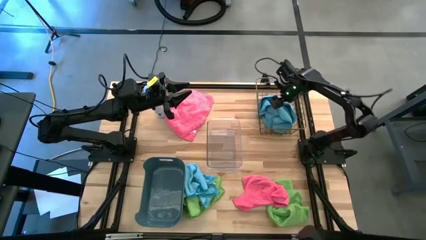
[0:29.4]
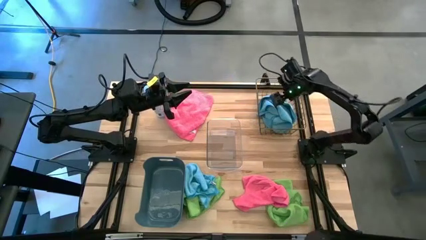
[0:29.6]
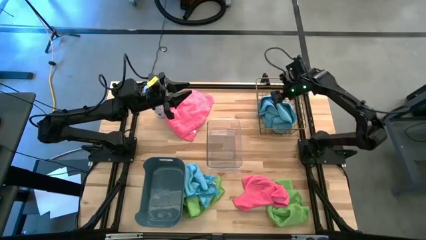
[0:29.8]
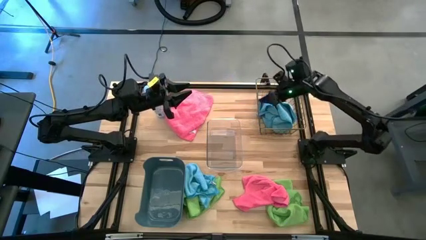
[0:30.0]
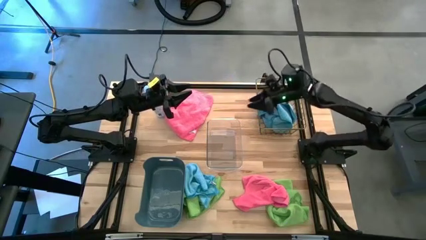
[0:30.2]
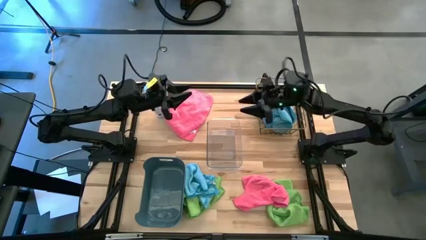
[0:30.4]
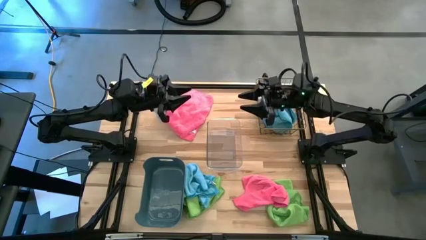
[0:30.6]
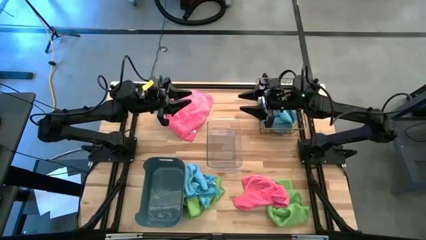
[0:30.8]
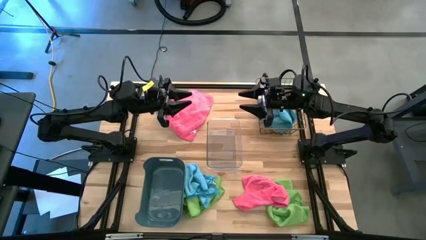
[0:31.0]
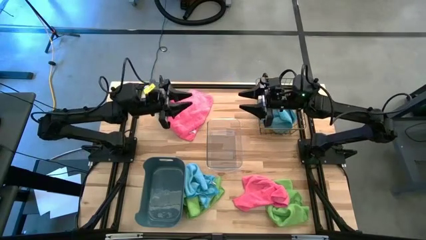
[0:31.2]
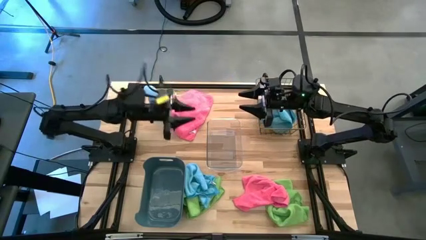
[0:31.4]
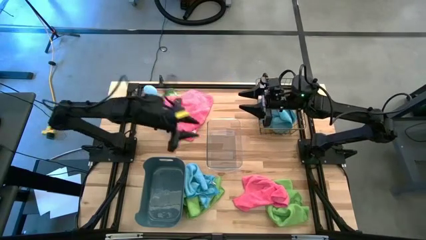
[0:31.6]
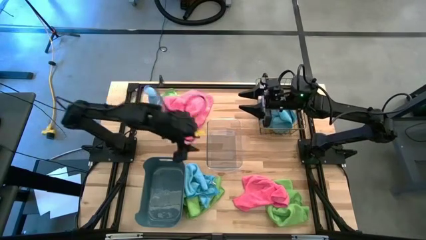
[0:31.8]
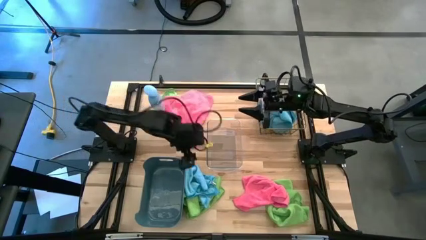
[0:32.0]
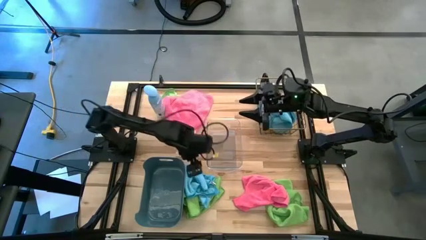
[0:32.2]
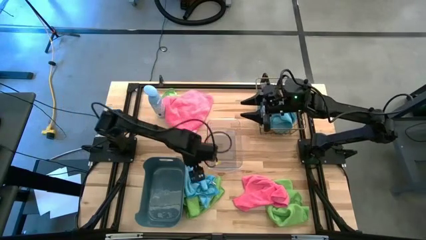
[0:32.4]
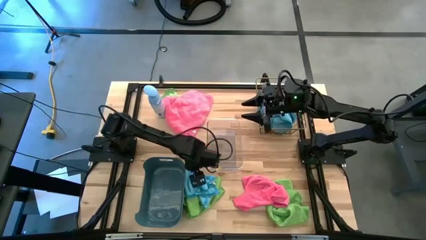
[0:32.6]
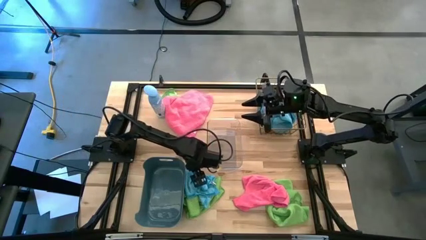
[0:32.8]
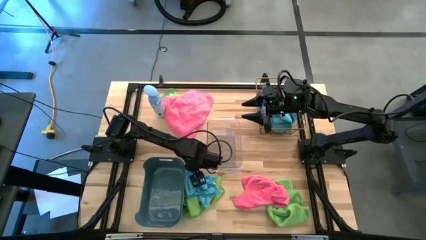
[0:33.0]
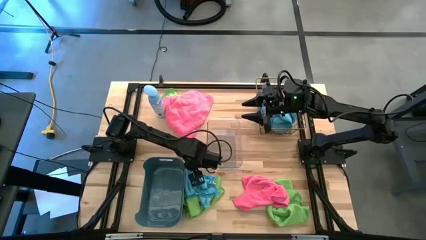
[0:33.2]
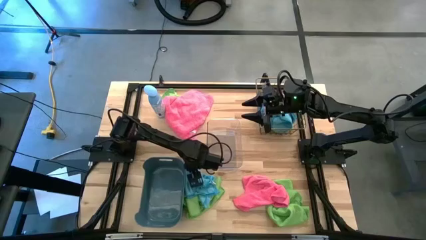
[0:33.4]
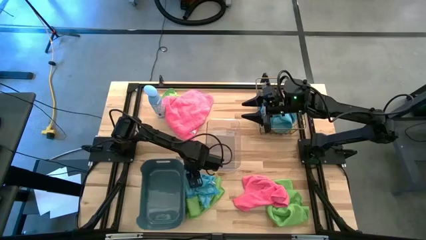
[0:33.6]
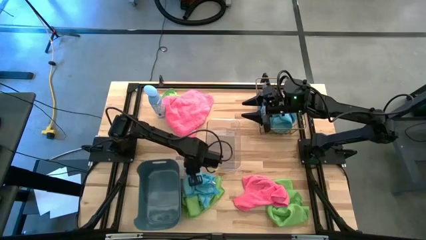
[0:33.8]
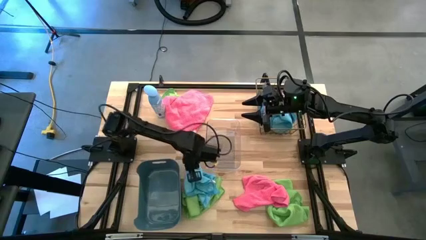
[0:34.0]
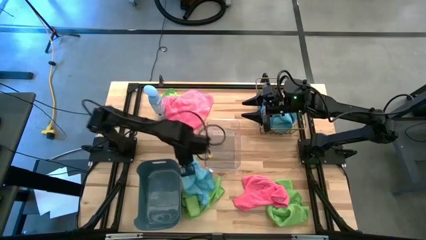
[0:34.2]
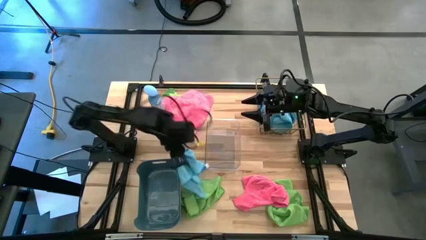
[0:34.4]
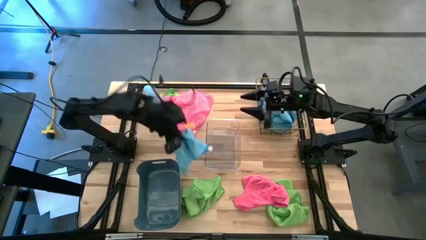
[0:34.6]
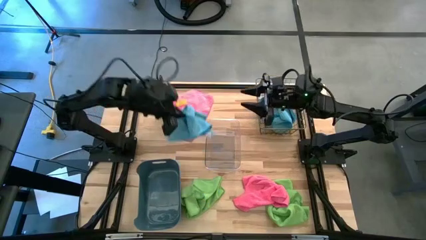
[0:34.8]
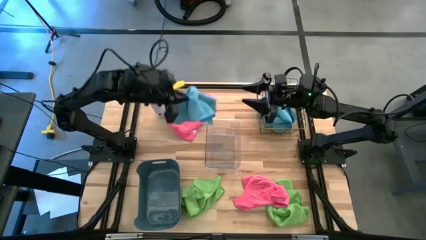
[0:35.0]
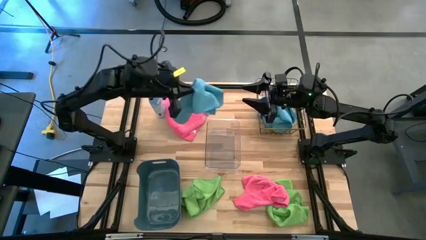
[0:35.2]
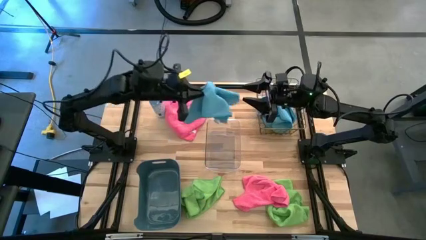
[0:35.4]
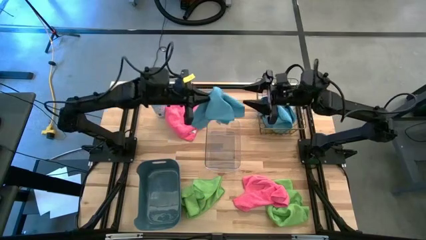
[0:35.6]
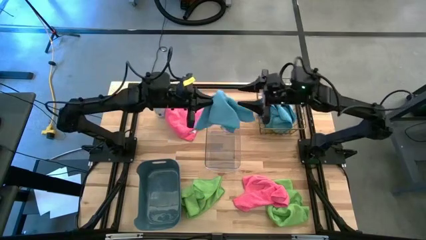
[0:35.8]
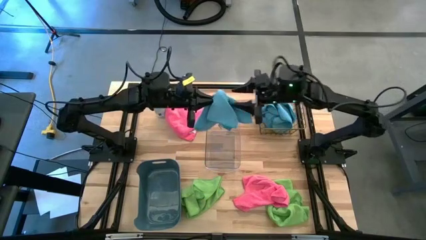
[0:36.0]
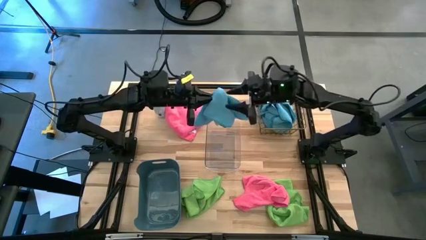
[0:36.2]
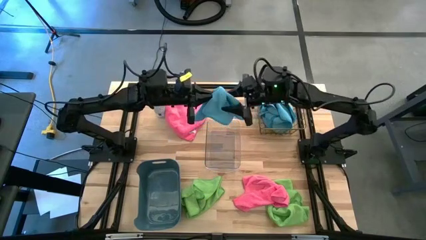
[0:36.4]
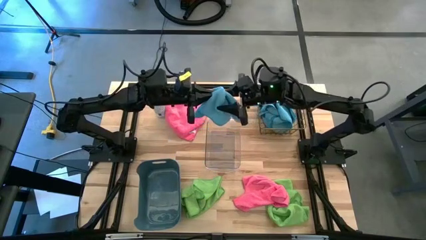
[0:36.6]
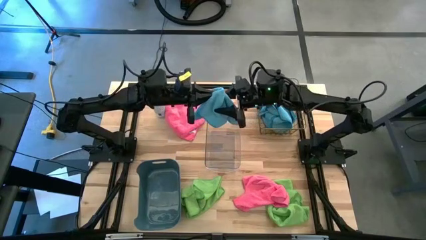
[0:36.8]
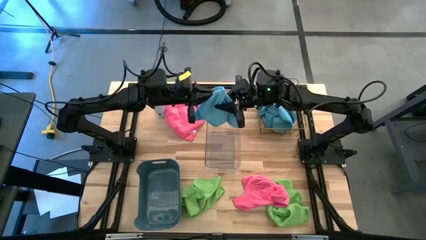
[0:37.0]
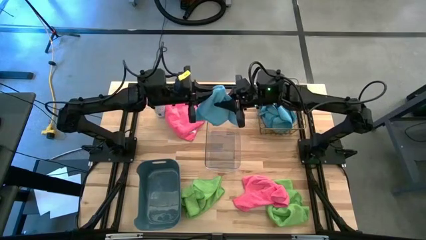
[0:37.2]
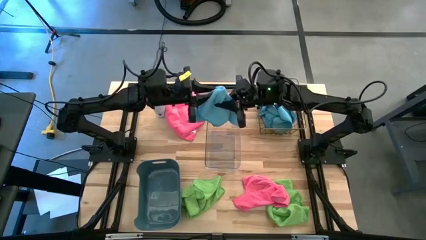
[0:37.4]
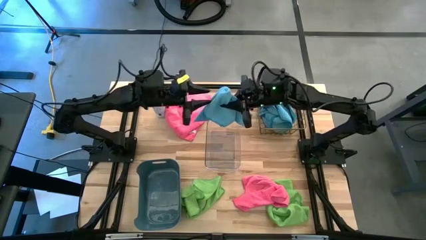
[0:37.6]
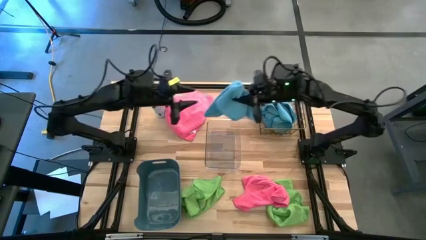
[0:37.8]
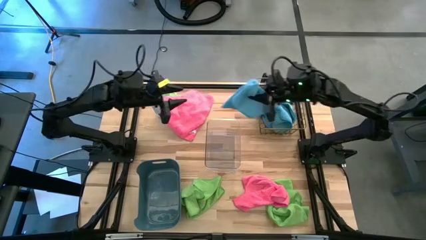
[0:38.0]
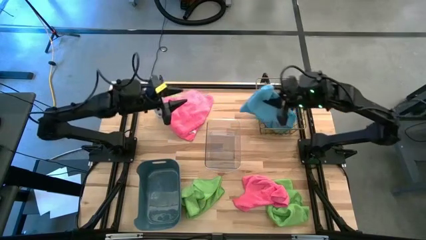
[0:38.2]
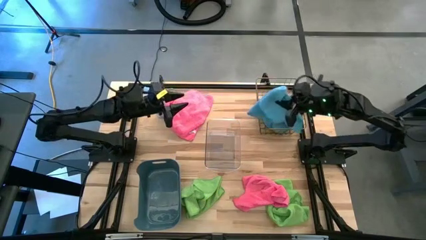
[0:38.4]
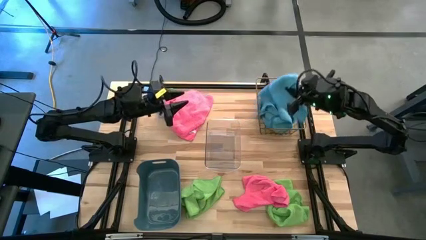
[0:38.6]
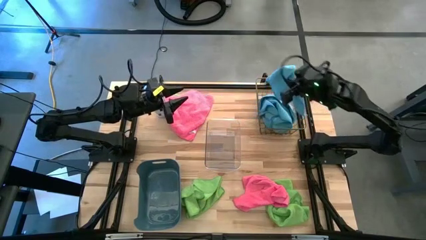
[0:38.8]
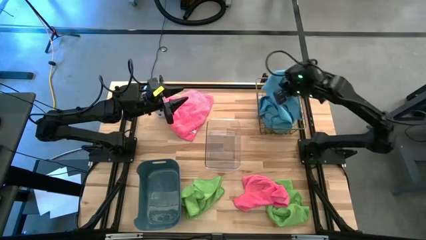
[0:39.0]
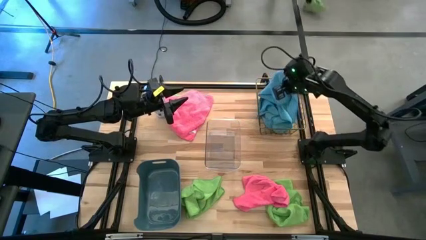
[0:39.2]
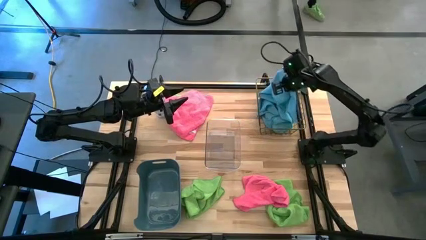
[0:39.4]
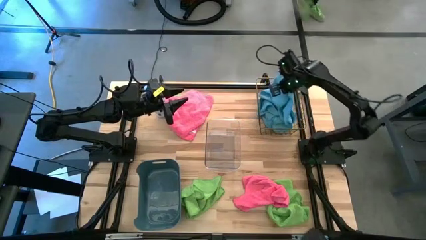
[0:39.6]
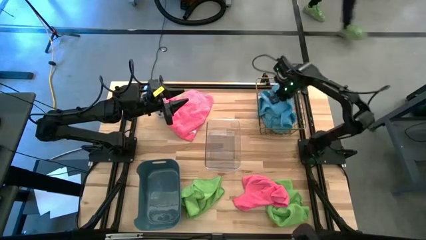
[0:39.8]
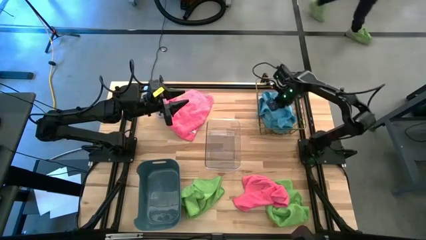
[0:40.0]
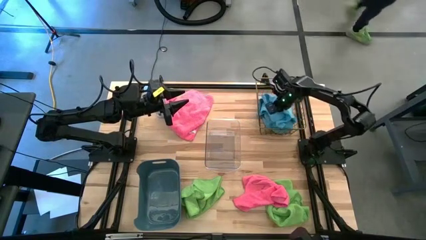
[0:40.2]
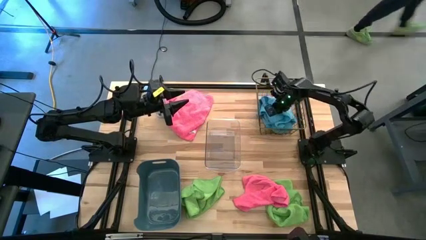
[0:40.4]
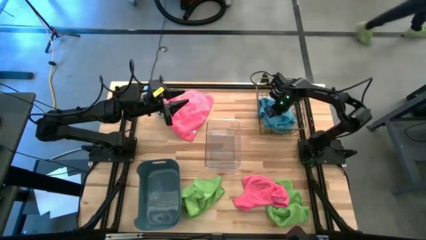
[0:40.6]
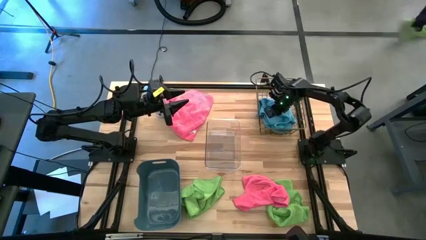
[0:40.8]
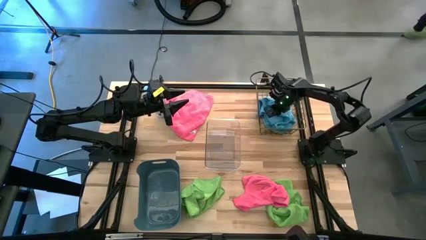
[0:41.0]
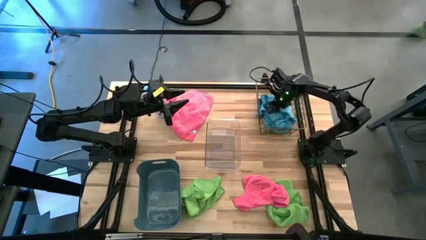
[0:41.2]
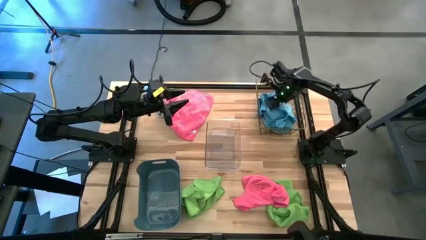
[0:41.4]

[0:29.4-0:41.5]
Task: Sort microfiber towel by color & place in baskets
Put the blue microfiber cloth into the wire basket
